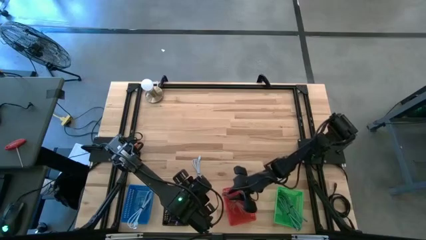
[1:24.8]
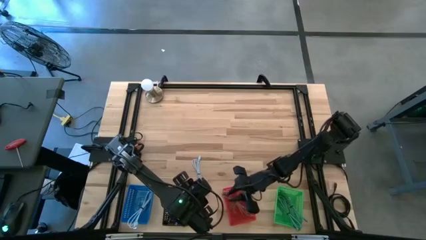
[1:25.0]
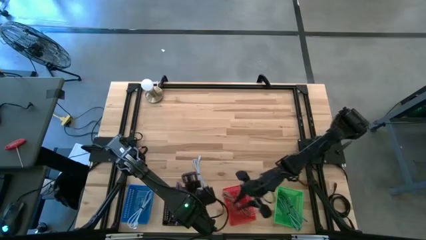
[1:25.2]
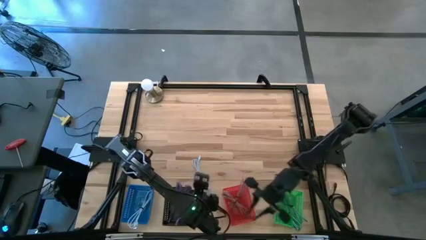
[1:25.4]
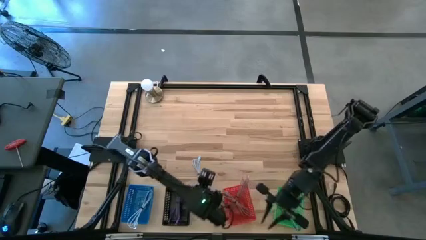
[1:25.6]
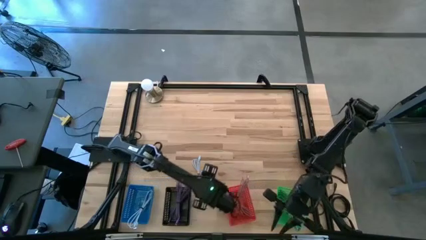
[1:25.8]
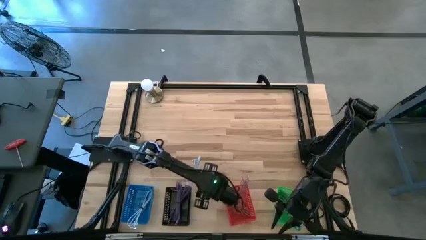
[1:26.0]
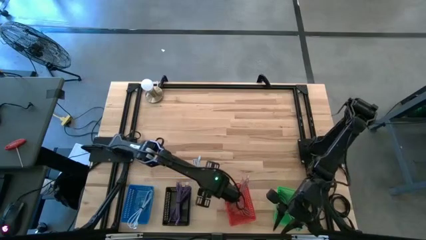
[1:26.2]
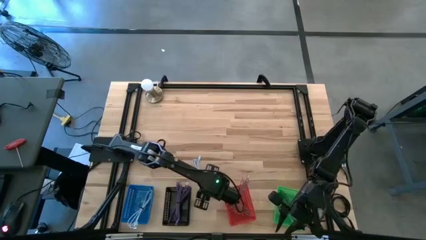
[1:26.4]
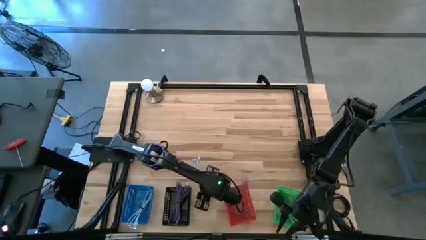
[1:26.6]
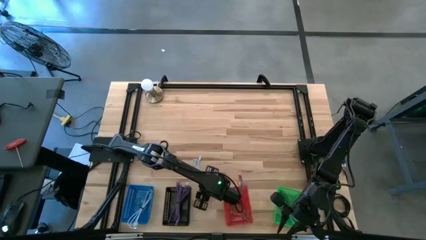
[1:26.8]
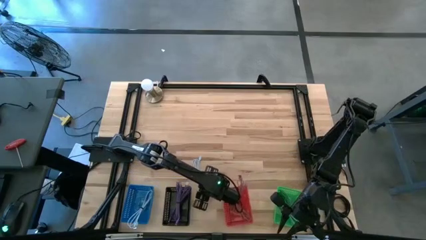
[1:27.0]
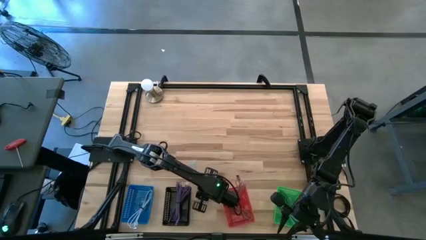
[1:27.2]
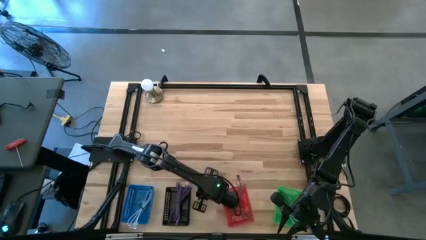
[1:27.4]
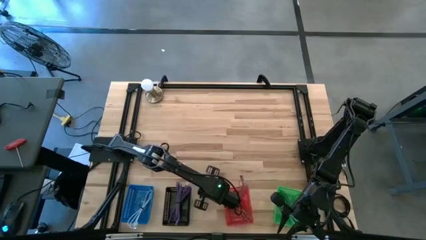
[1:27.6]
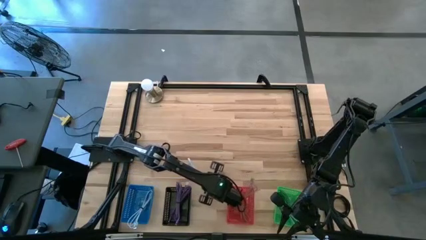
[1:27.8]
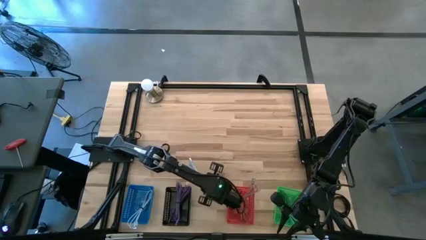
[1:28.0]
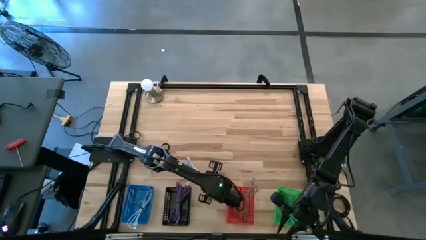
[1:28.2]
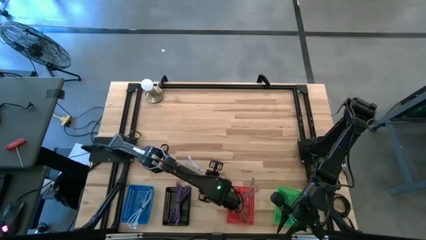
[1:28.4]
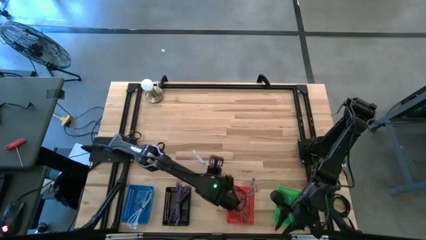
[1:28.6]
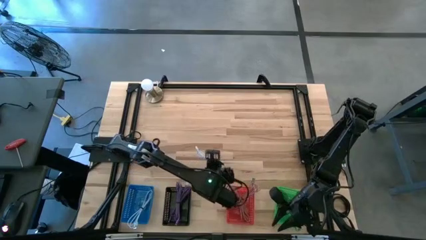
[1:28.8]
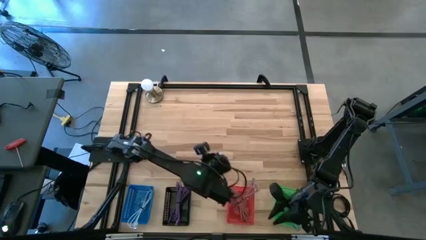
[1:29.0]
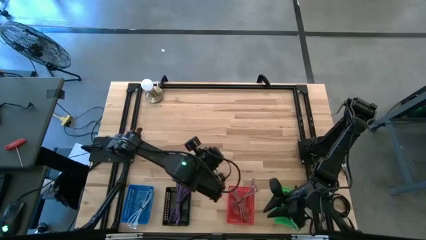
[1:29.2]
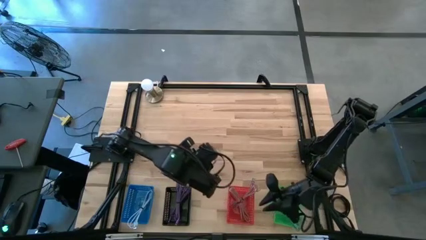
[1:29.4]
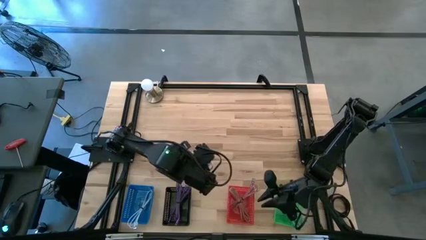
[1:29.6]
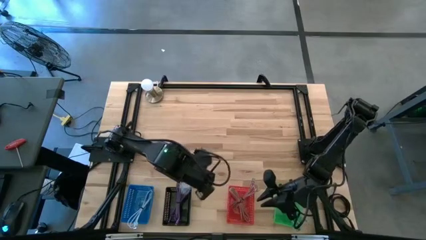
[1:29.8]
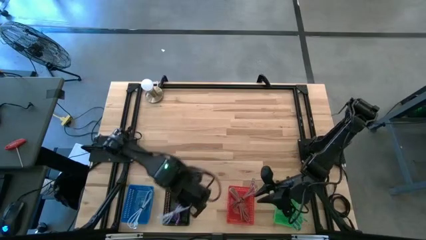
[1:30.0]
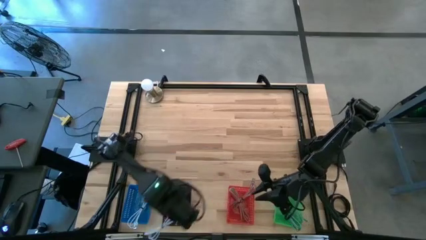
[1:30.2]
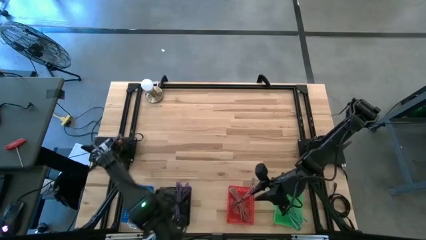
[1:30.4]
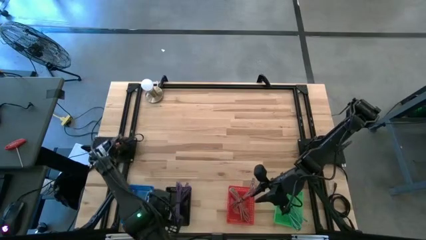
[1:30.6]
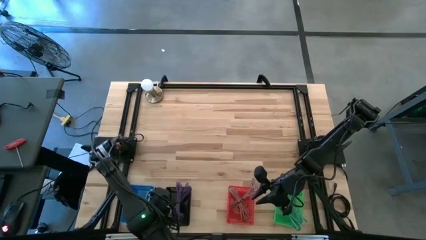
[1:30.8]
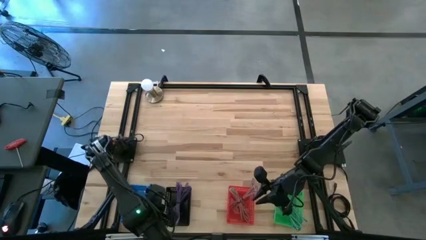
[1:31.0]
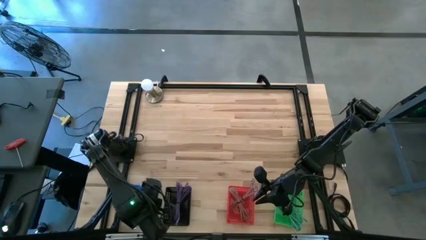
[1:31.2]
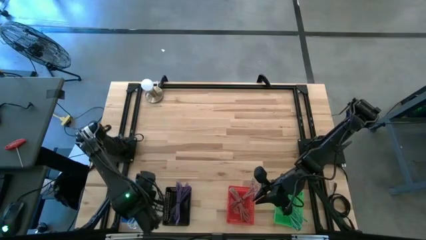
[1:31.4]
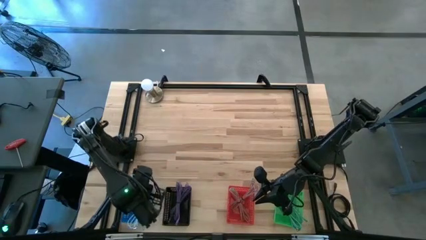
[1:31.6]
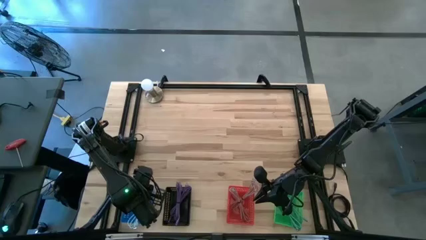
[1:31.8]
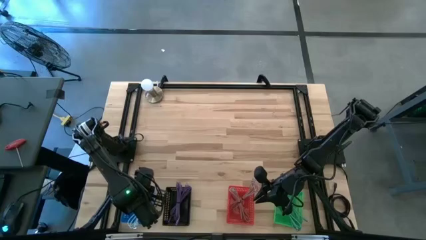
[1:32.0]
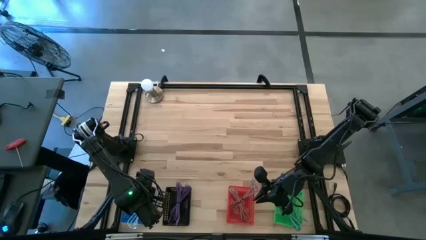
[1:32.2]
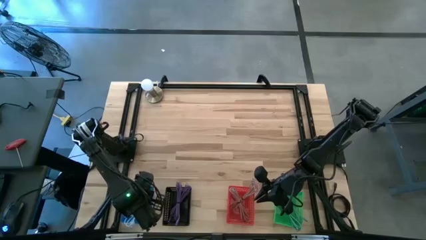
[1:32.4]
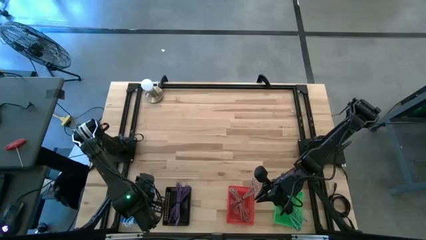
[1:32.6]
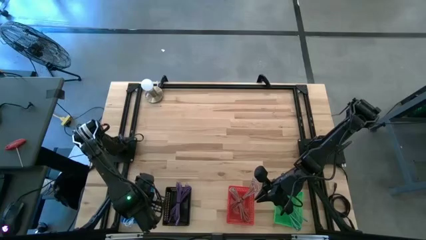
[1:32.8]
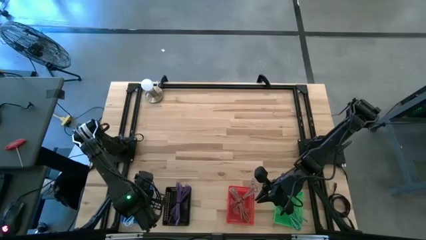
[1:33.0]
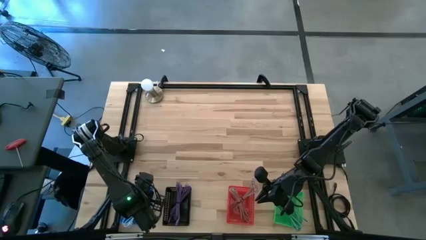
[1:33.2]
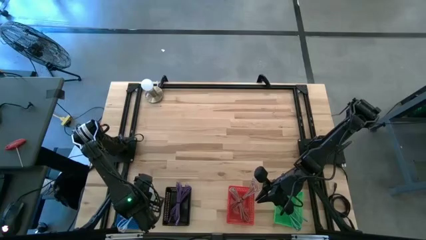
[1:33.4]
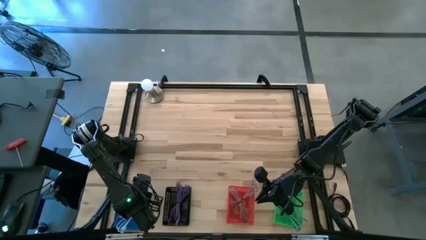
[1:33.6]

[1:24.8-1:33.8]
Task: Pick & Place USB Port
Put the white charger cable into the blue bin

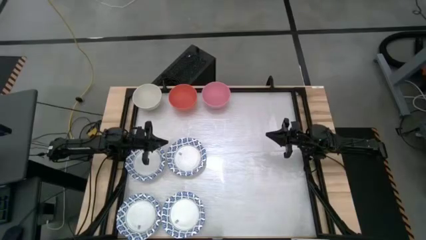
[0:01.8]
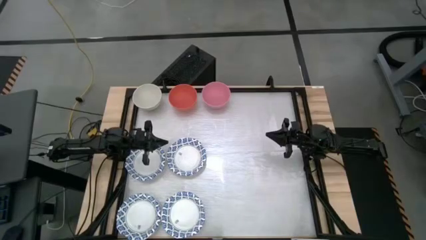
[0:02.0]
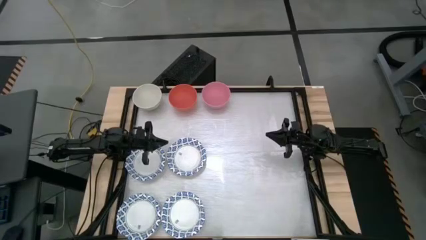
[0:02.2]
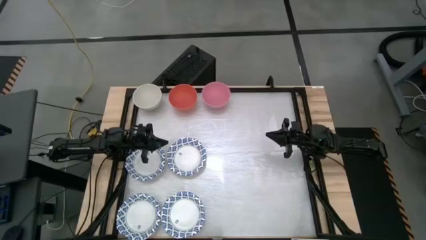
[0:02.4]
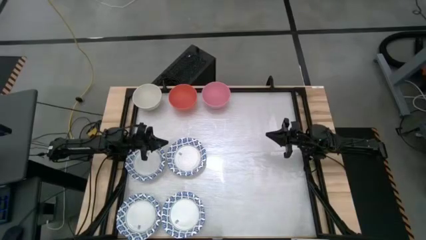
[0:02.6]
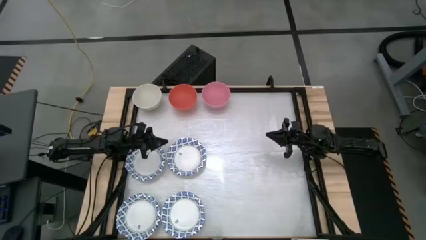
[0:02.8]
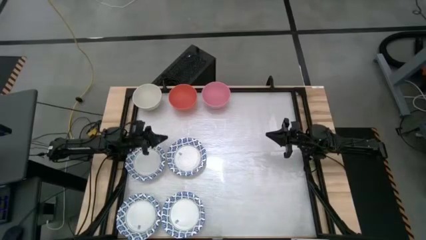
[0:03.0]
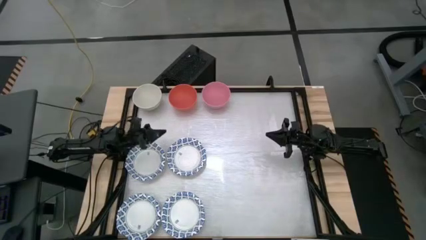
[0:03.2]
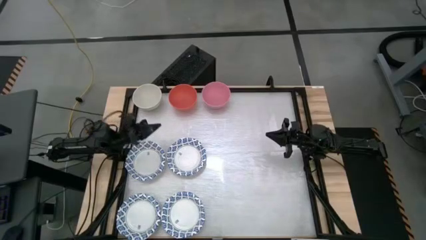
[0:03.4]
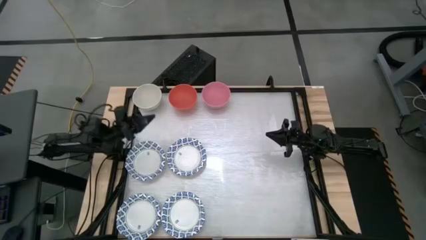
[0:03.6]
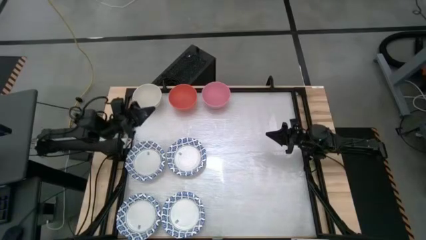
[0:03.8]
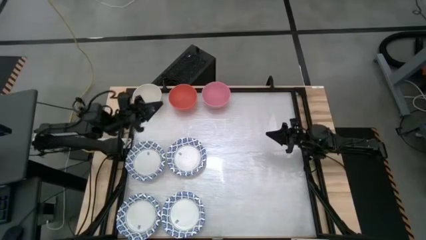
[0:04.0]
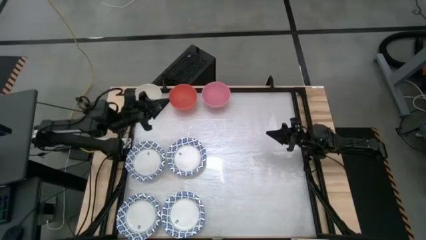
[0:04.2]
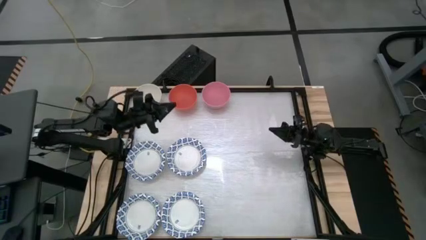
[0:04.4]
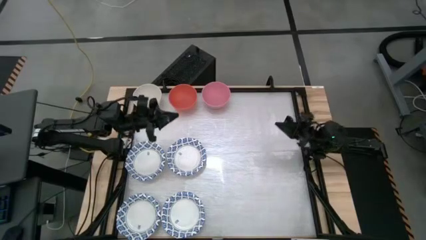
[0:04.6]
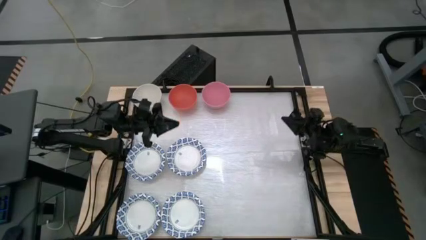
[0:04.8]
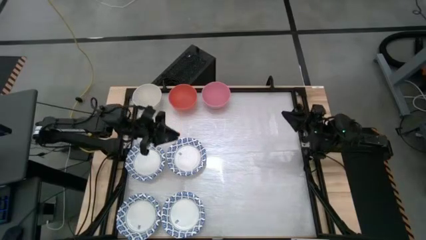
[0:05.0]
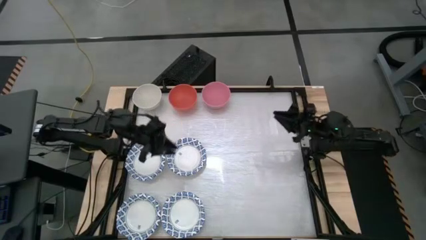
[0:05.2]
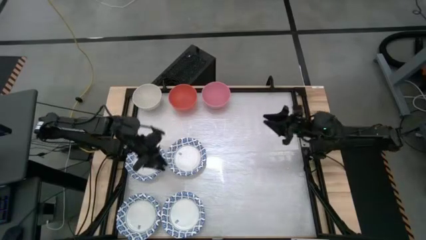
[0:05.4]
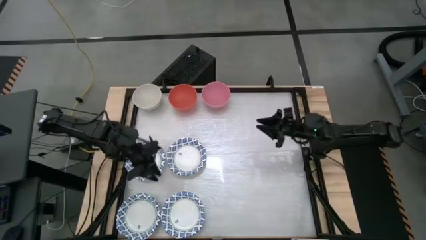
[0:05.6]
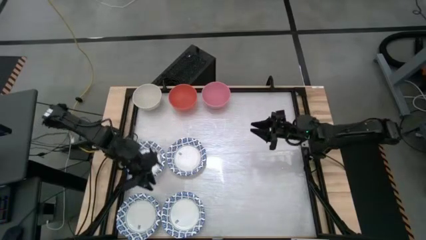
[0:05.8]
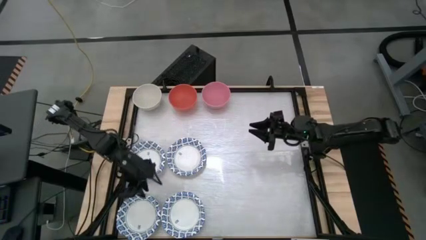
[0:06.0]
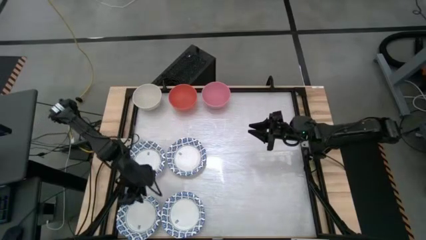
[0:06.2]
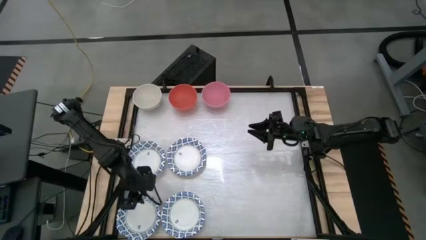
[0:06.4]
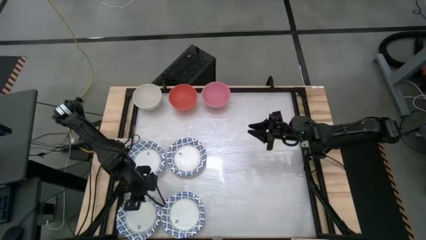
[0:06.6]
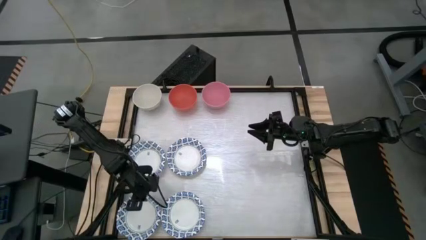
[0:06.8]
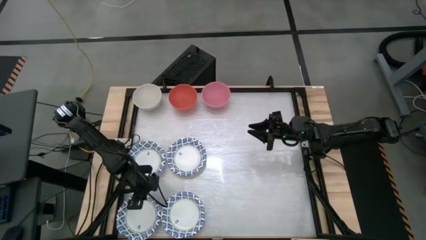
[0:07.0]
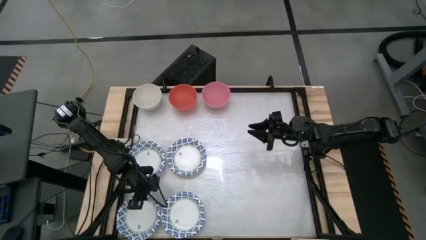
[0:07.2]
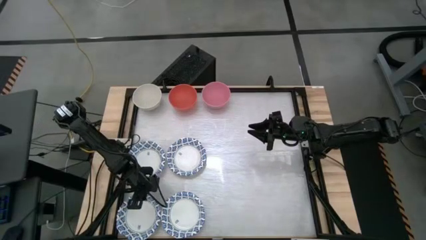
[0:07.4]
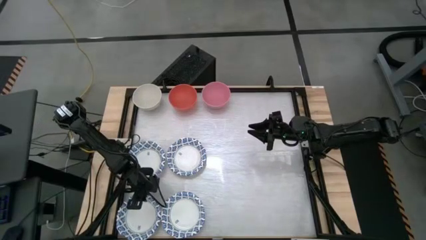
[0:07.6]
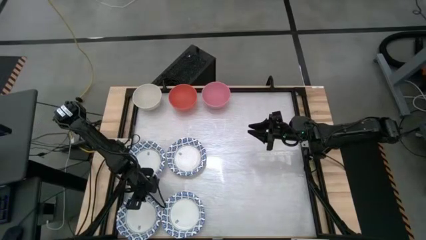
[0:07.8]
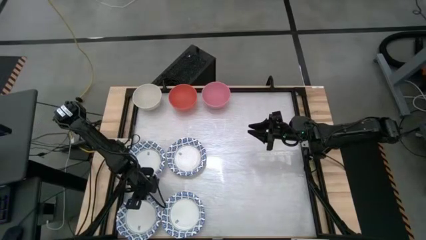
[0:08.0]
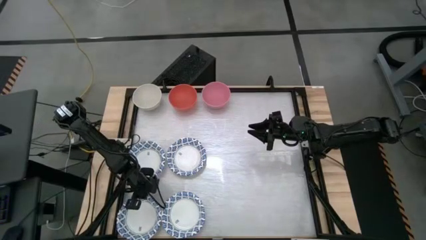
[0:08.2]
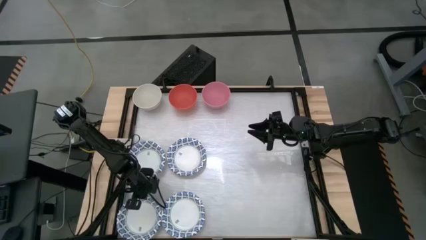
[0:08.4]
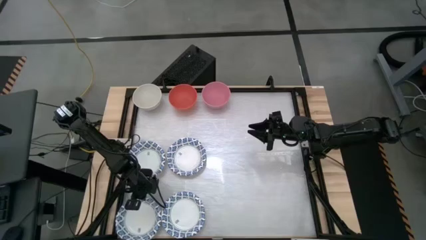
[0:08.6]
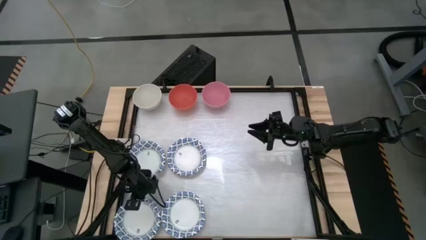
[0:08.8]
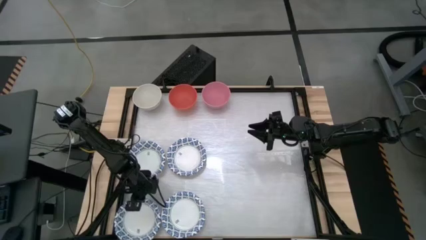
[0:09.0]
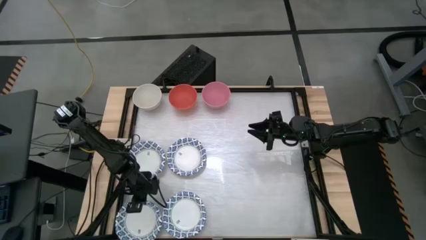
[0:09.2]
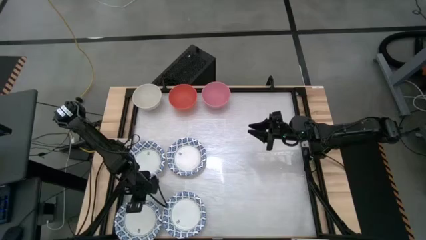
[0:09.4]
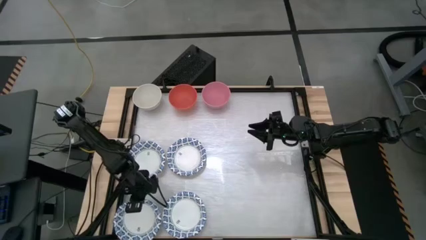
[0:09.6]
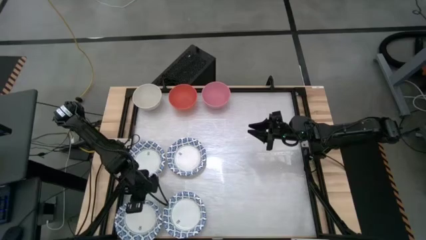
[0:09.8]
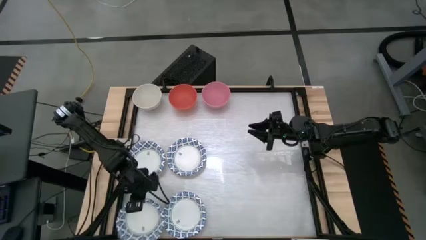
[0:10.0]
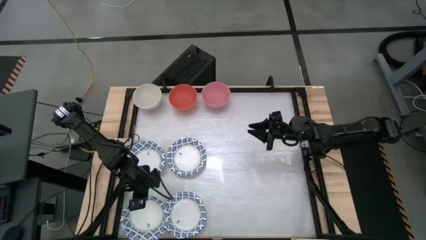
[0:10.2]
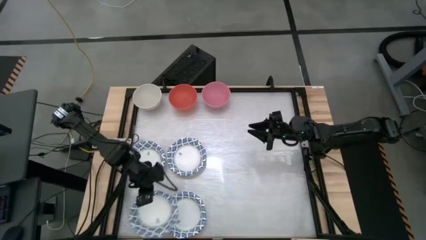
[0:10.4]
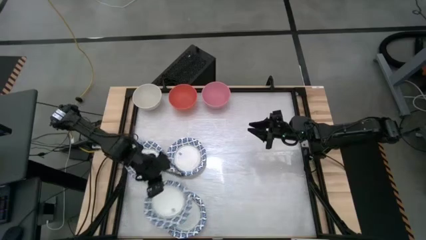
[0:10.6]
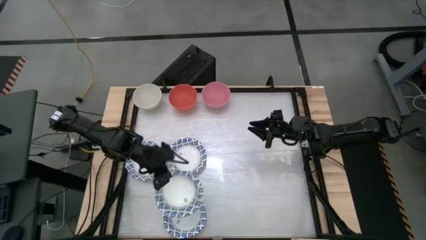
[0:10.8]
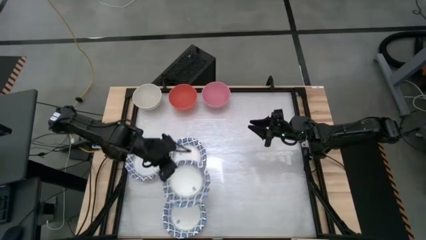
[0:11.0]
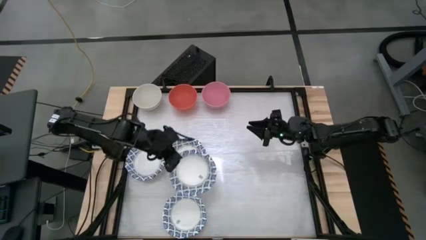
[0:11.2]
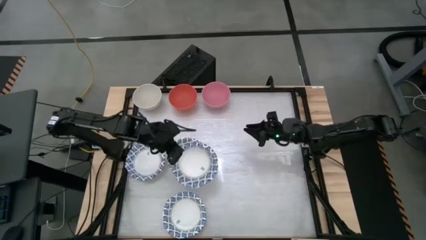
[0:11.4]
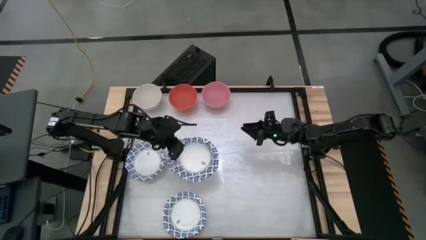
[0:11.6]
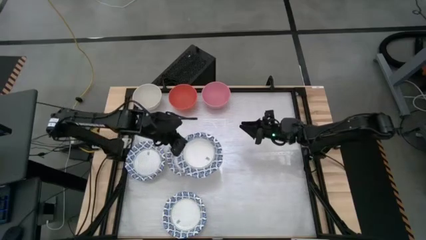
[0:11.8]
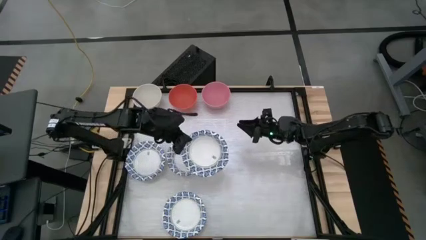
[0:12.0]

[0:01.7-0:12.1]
Task: Nest bowls inside each other by size order
Stack the white patterned bowl on top of the white patterned bowl
